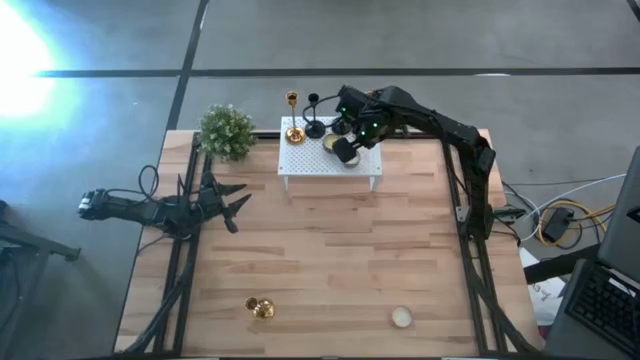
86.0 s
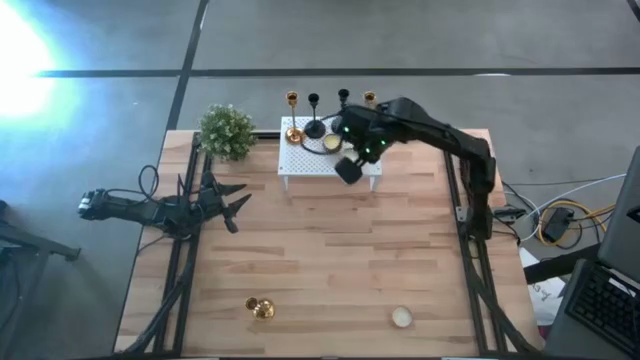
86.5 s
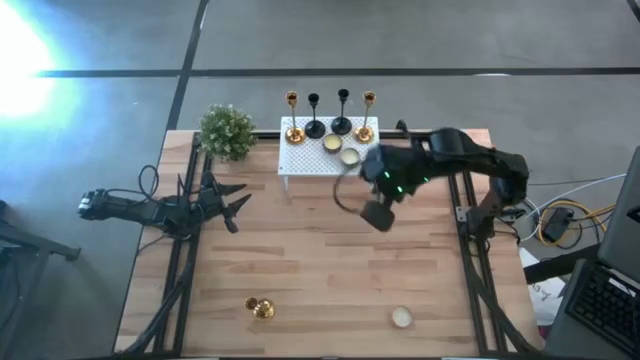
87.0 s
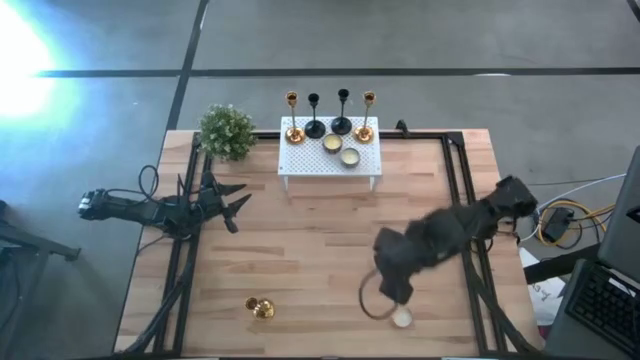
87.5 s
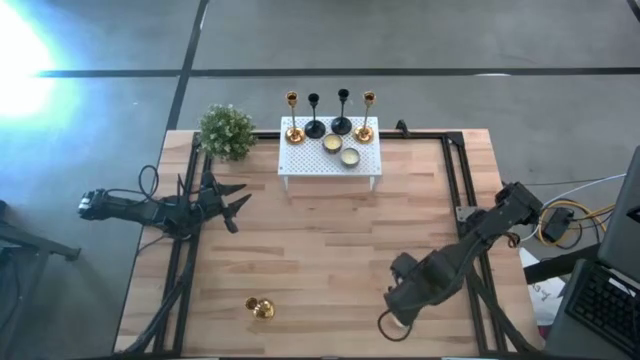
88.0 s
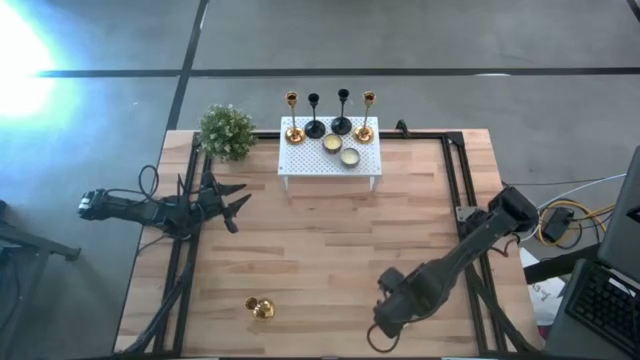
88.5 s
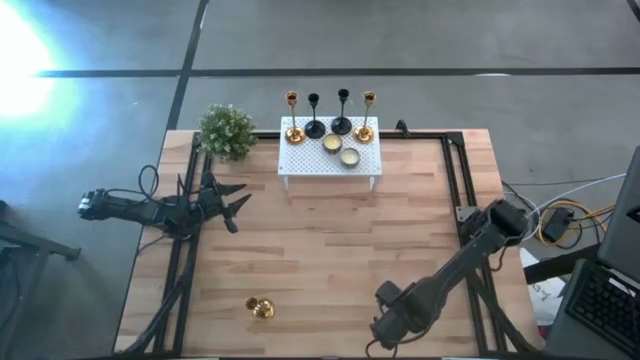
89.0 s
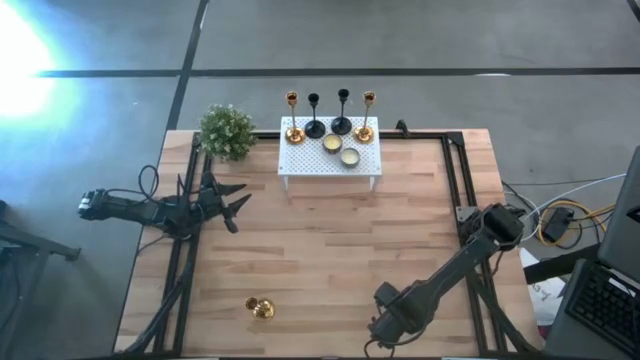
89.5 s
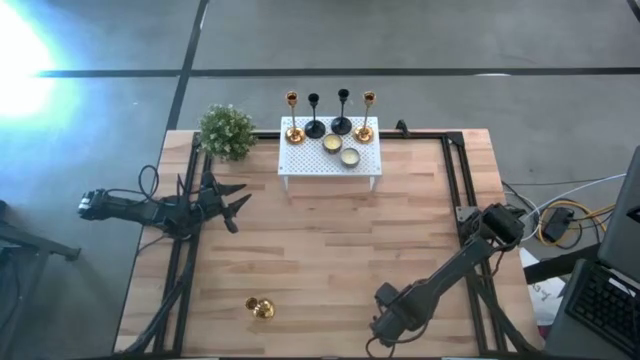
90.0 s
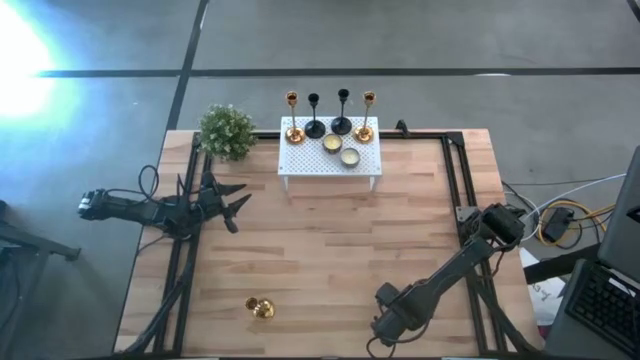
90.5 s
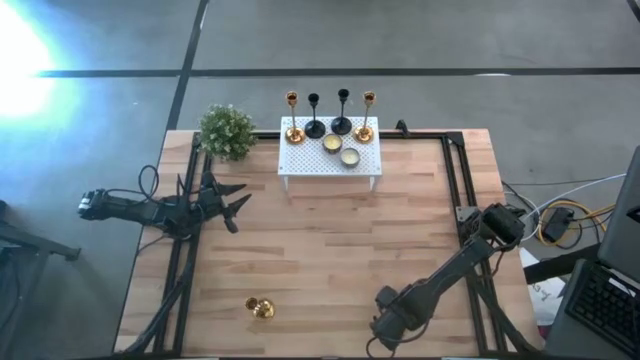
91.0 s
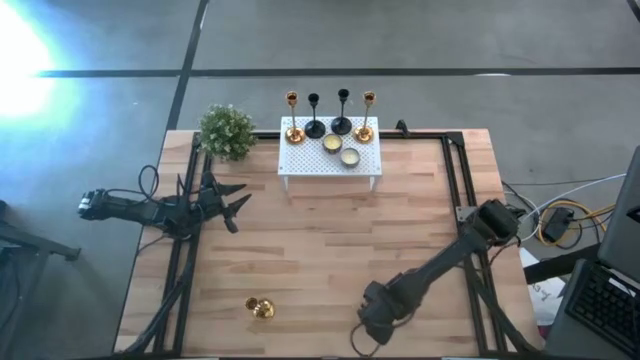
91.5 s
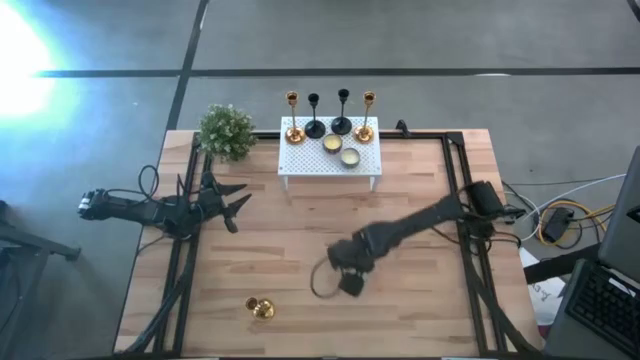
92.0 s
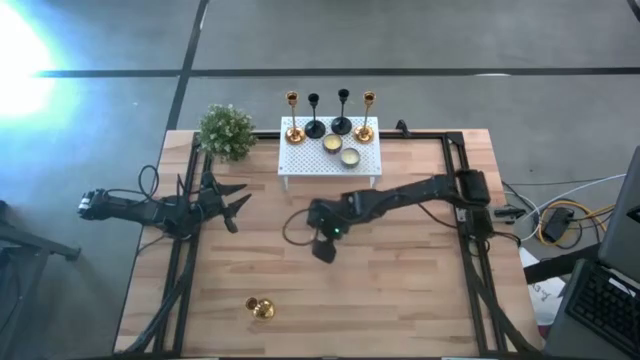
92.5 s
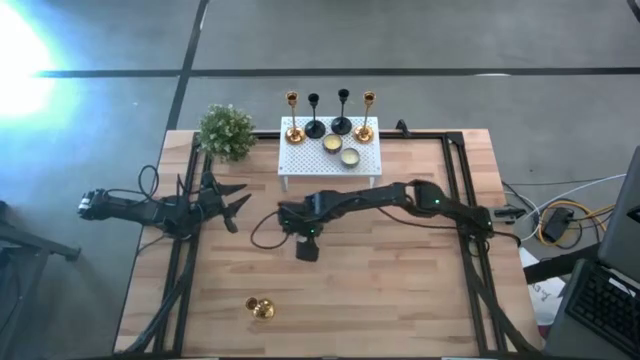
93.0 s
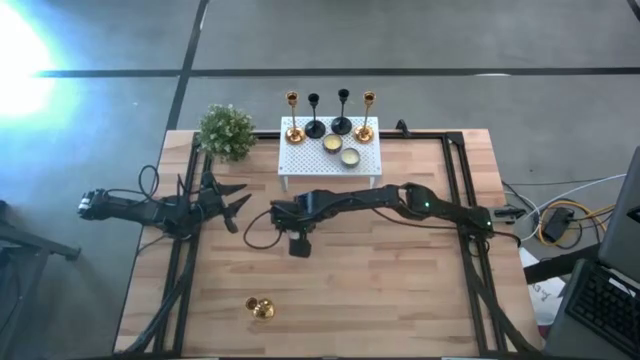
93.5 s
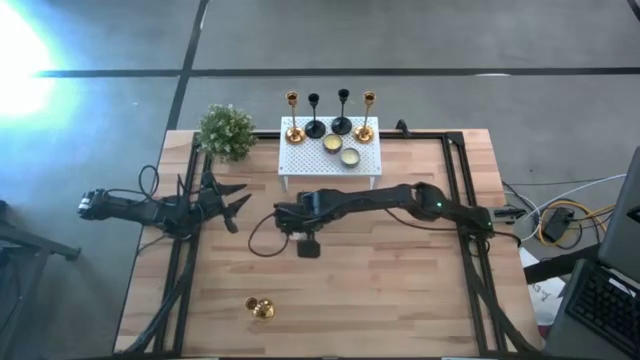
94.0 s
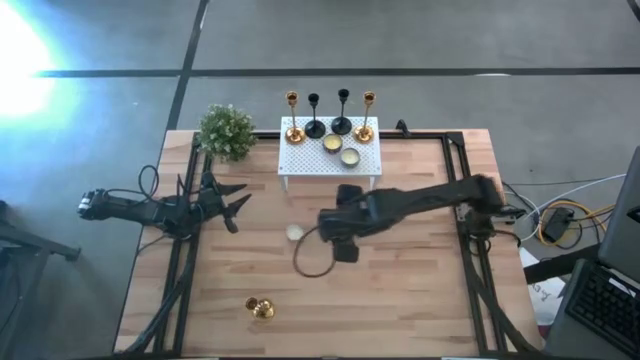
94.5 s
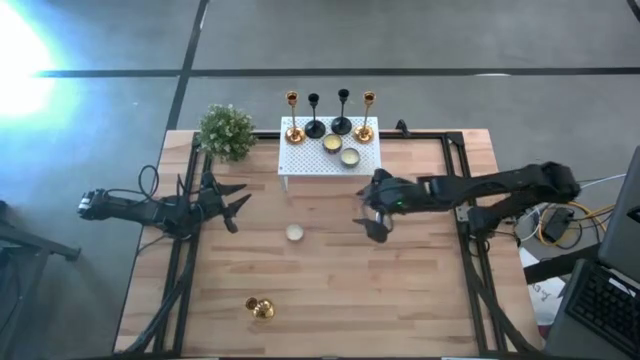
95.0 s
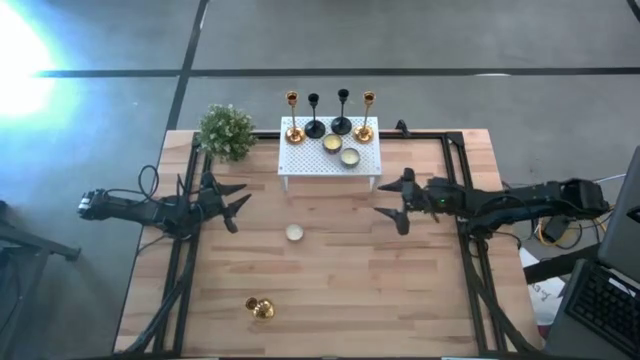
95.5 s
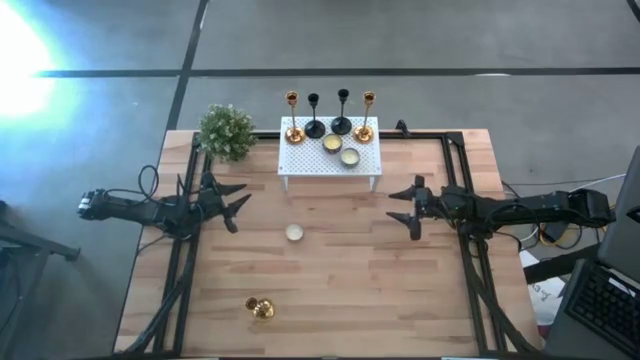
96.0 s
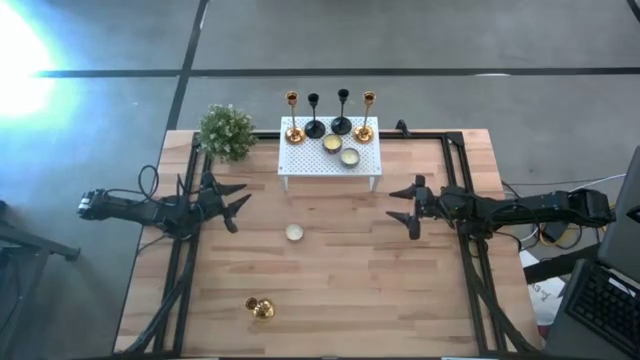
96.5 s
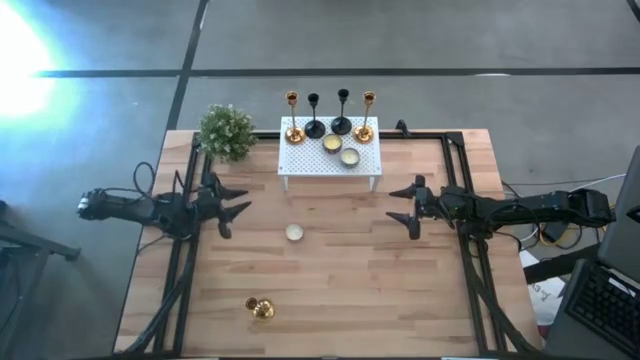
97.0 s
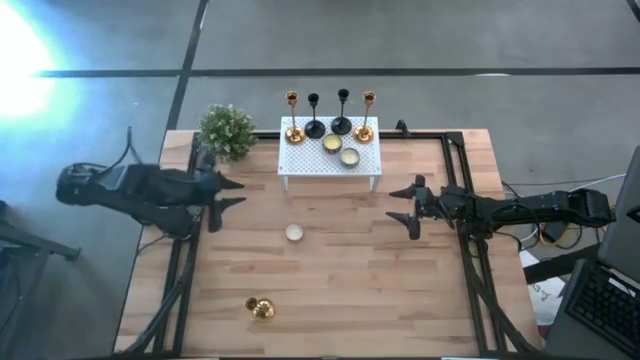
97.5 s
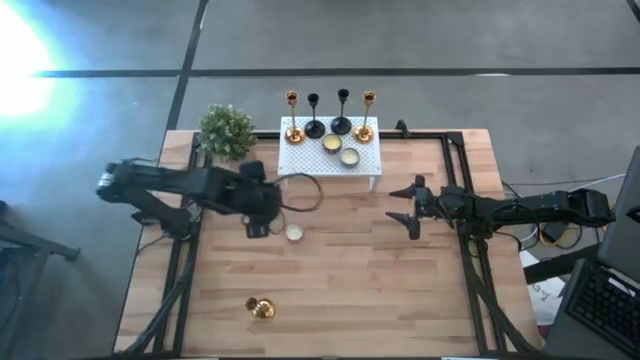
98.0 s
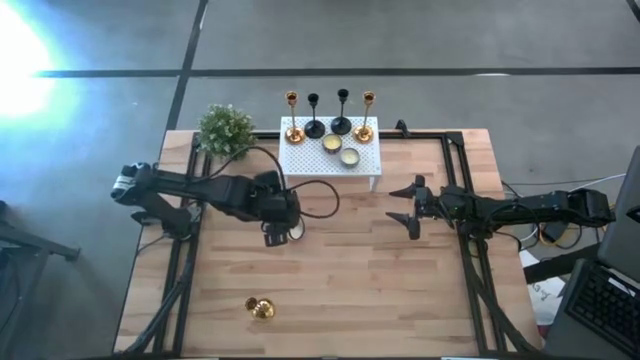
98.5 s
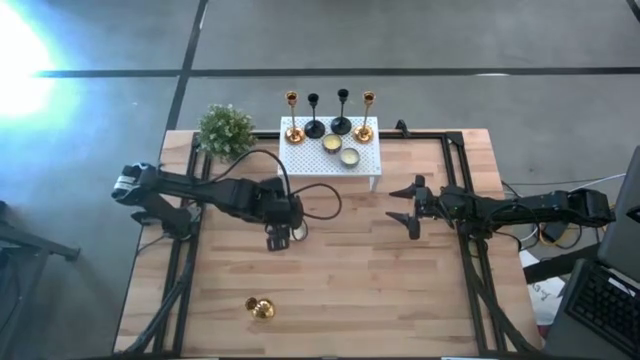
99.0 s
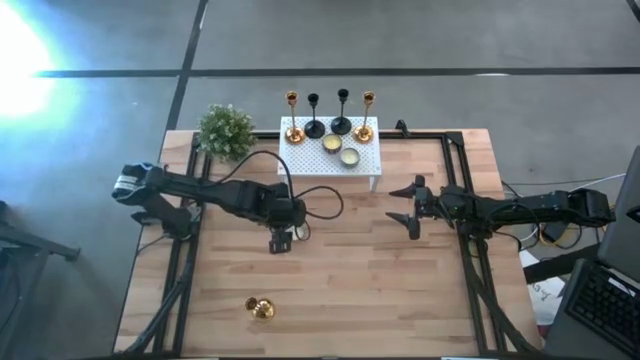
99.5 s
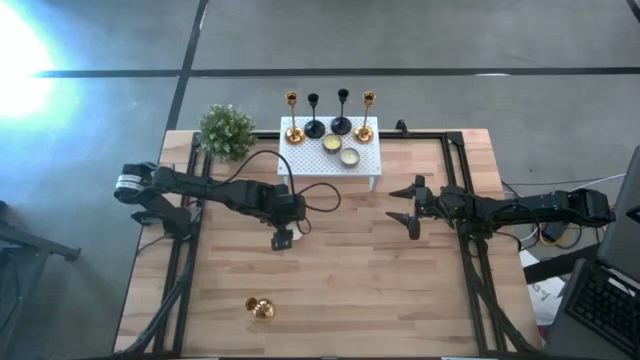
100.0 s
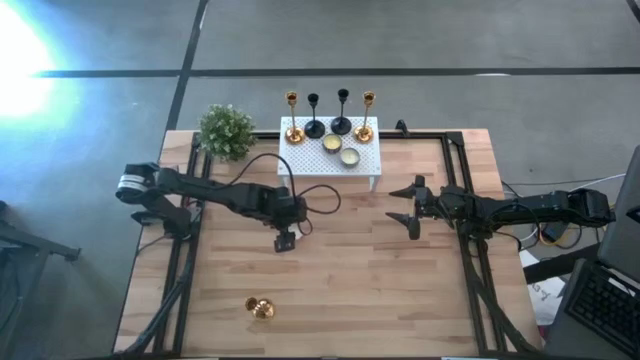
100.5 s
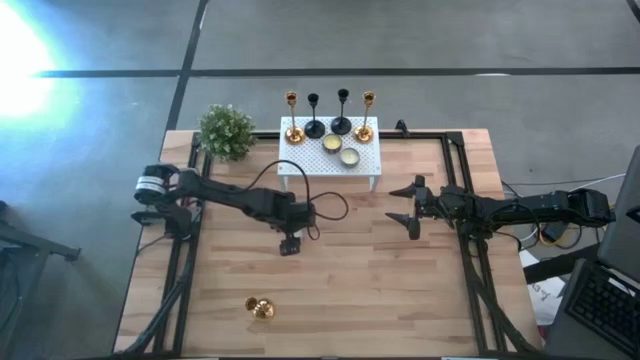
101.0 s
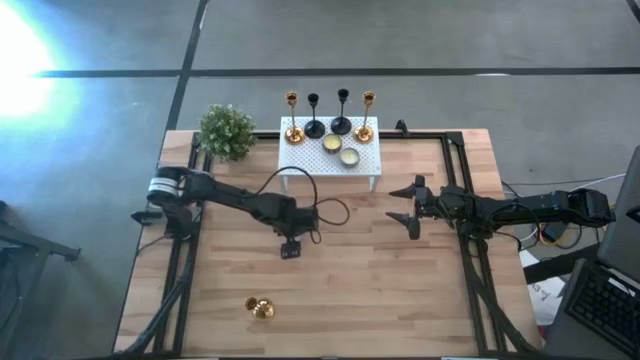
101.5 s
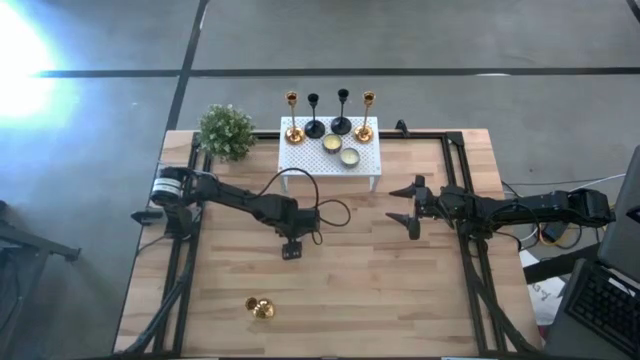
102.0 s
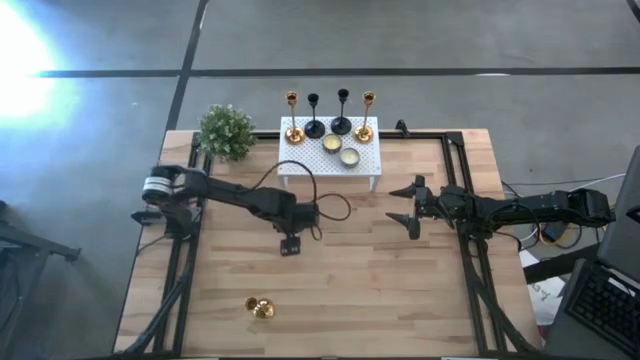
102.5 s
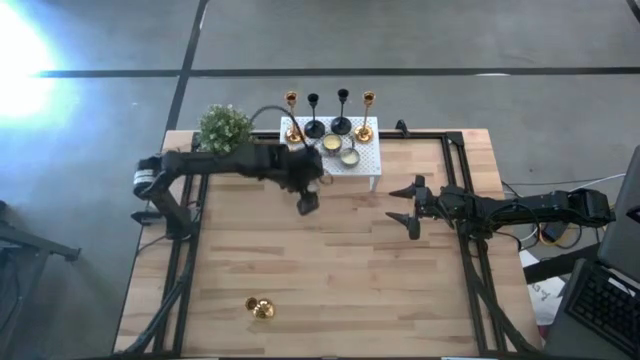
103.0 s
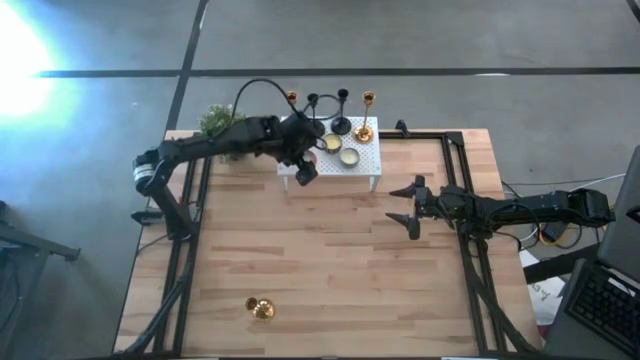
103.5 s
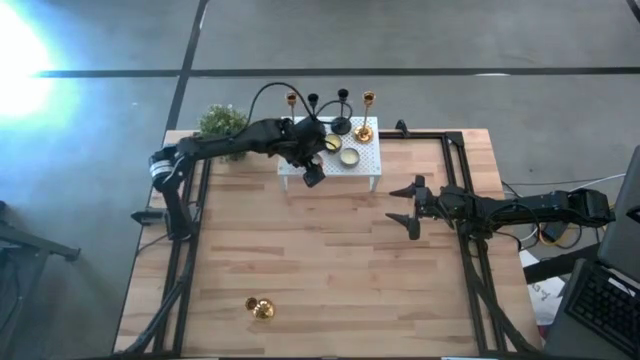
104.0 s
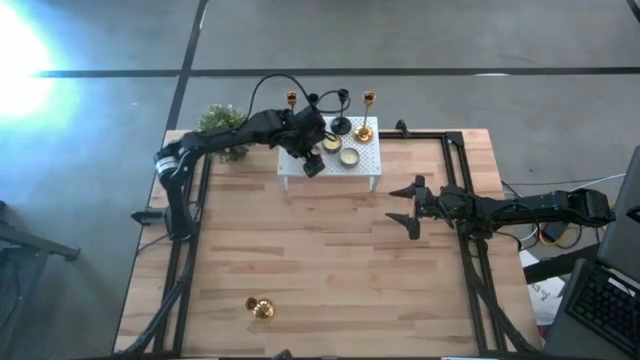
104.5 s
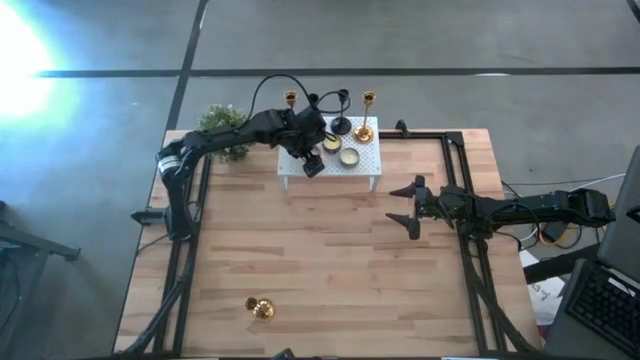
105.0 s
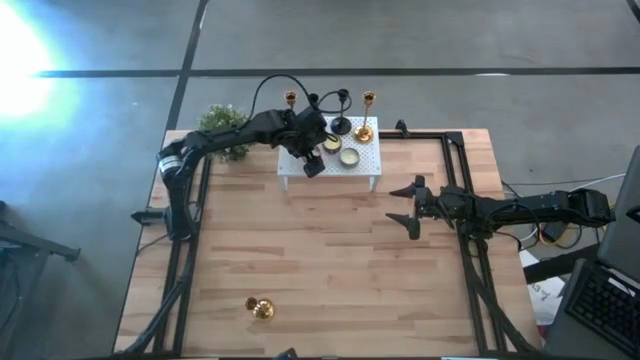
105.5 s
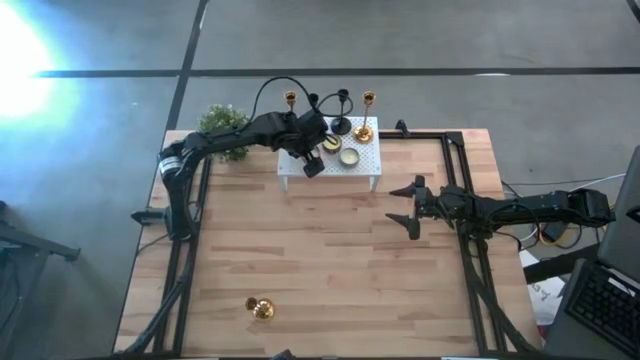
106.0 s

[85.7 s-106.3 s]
Task: Pick & Place candle stick holders
Put the orange scented candle on the shelf

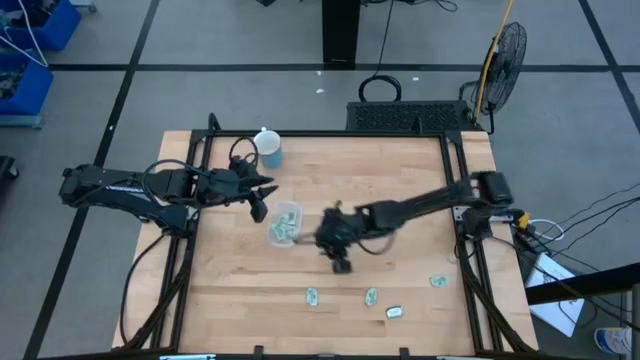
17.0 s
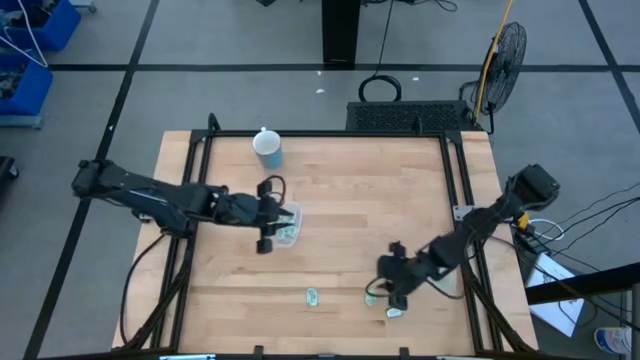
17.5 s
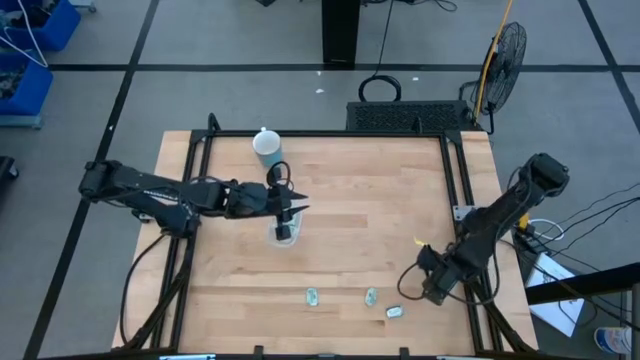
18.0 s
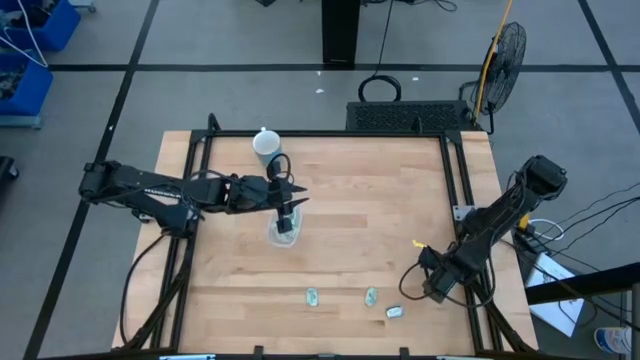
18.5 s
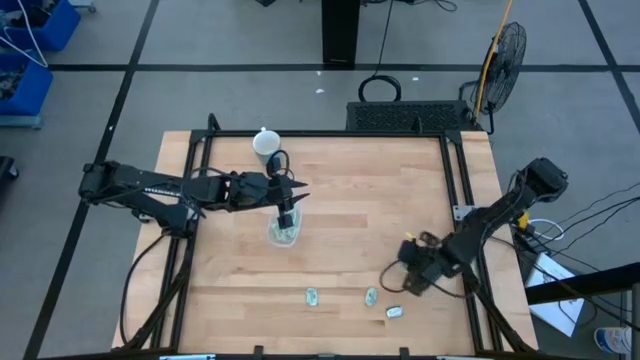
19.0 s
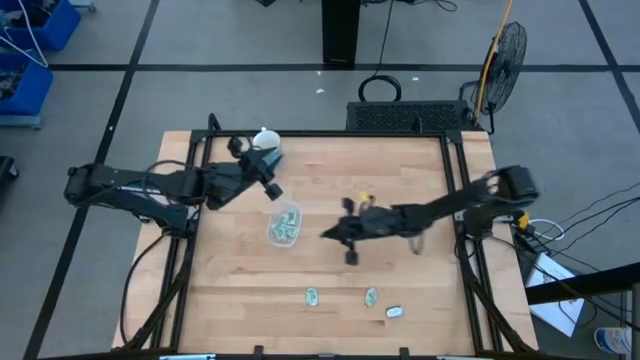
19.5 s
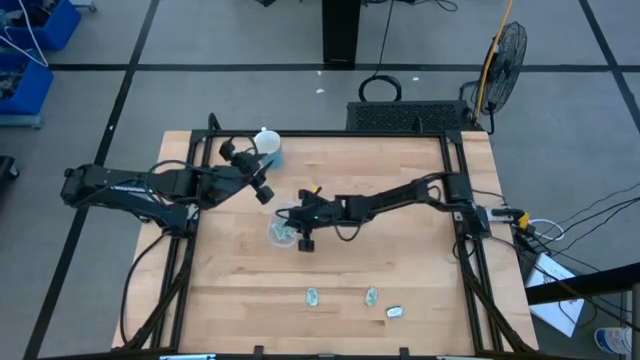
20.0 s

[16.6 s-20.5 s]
Task: Pick and place Stevia / Truvia into bins
Put the light green stevia packet into the transparent container
